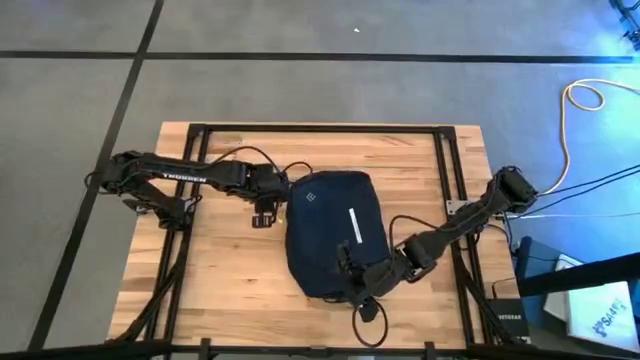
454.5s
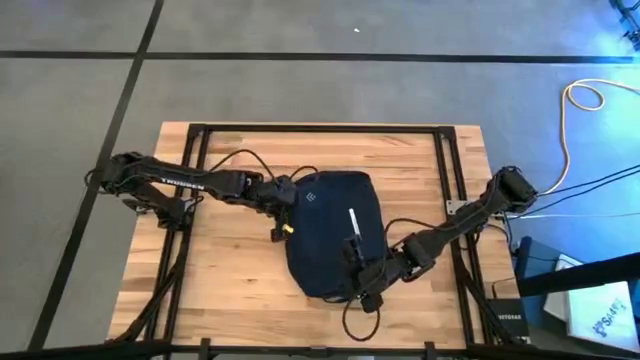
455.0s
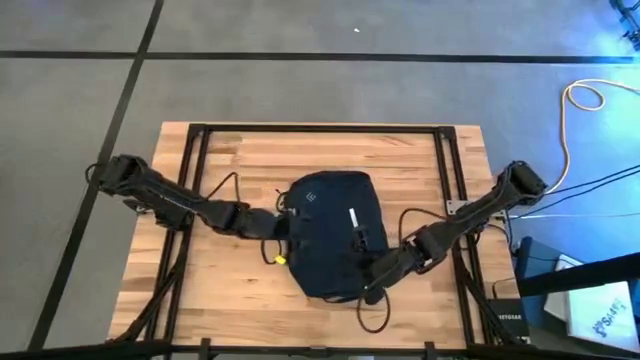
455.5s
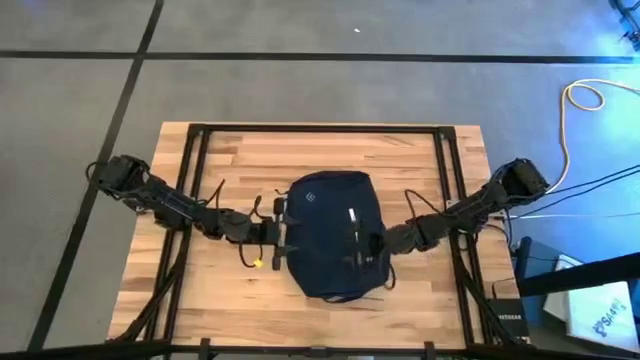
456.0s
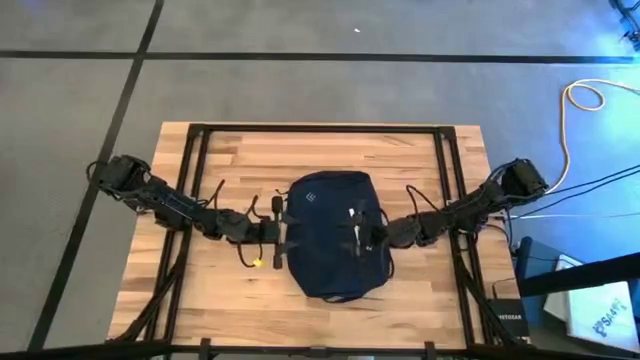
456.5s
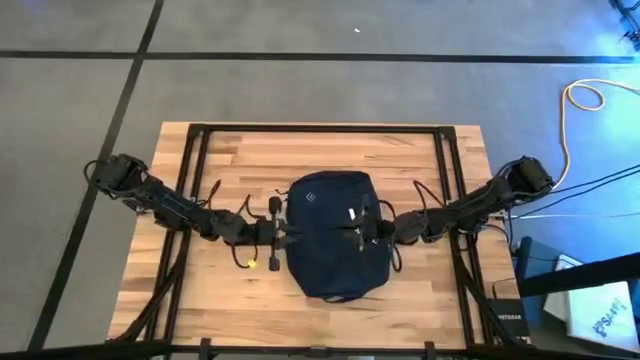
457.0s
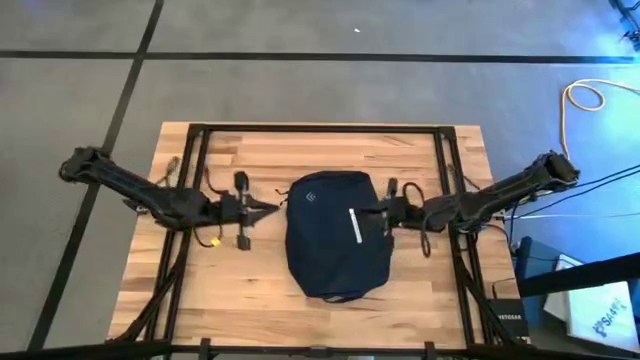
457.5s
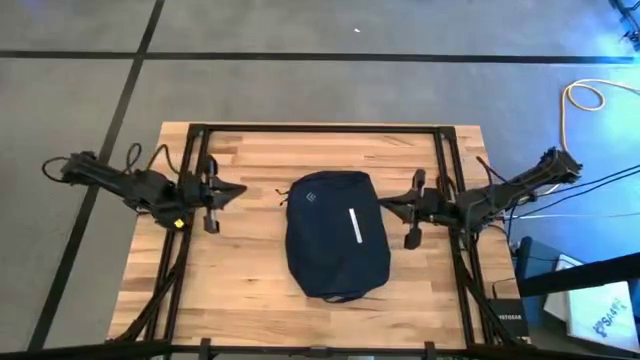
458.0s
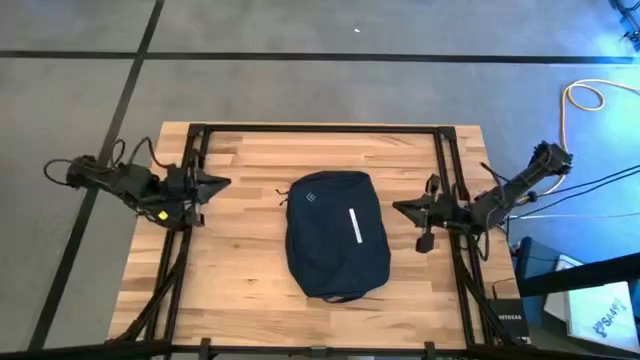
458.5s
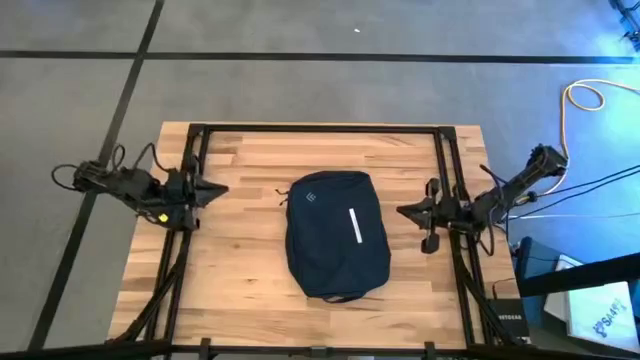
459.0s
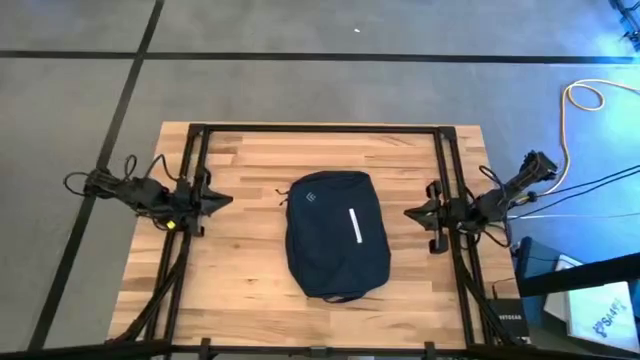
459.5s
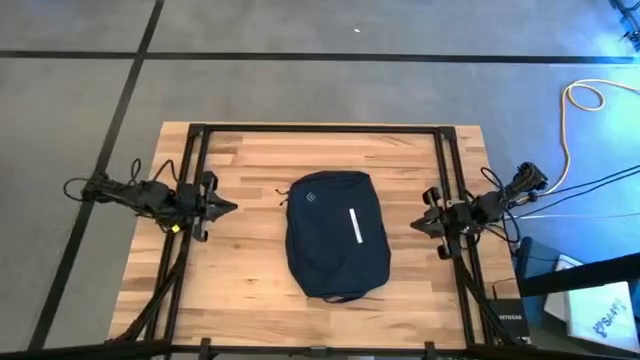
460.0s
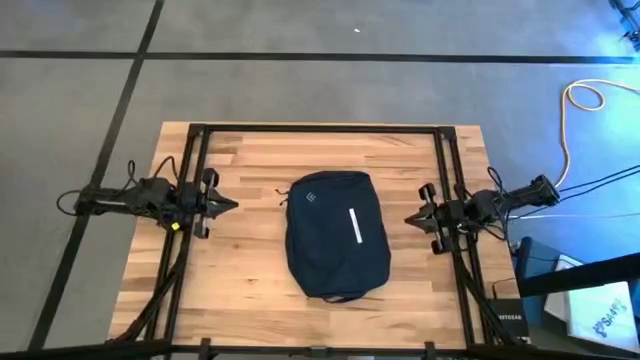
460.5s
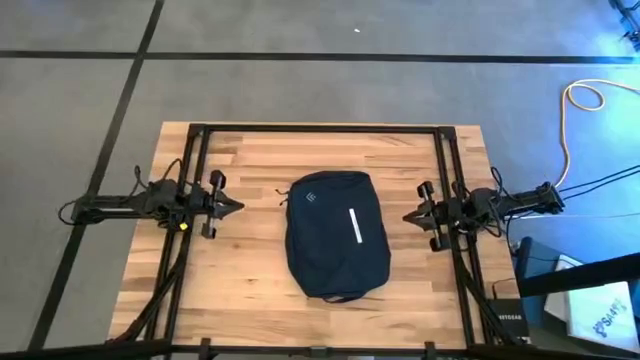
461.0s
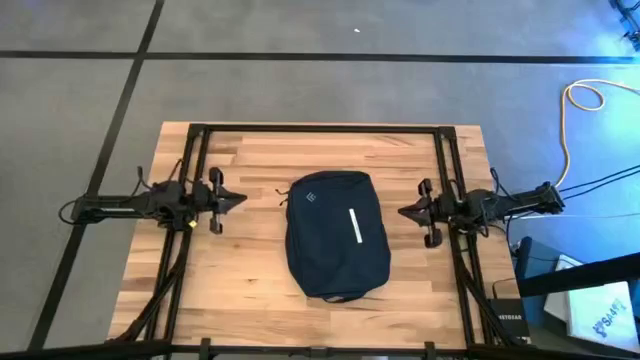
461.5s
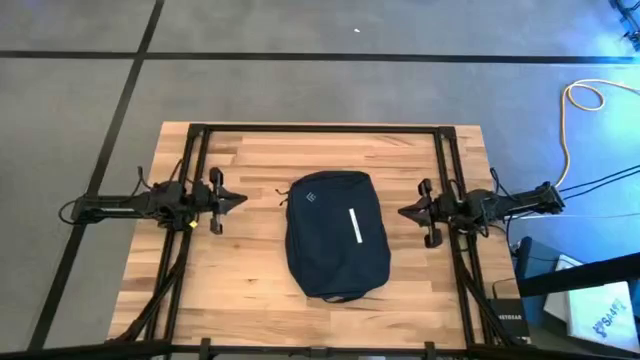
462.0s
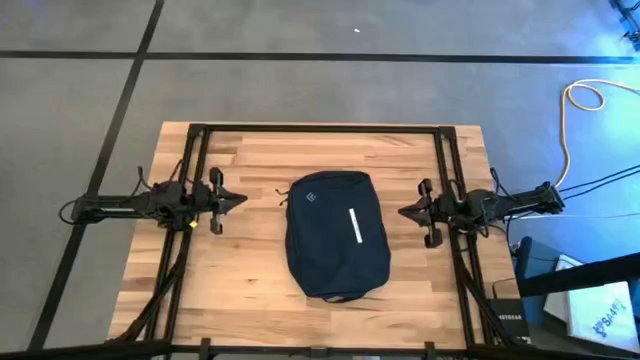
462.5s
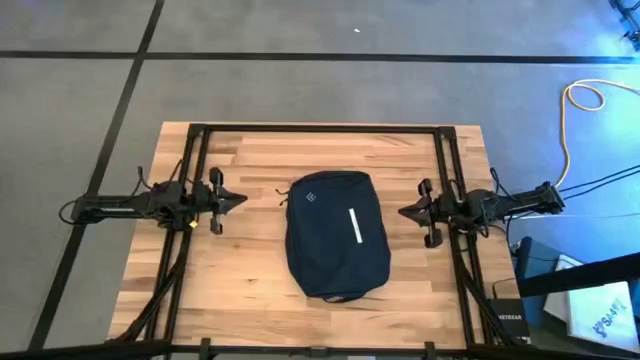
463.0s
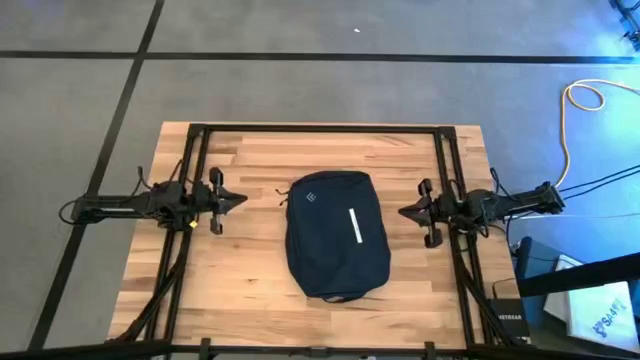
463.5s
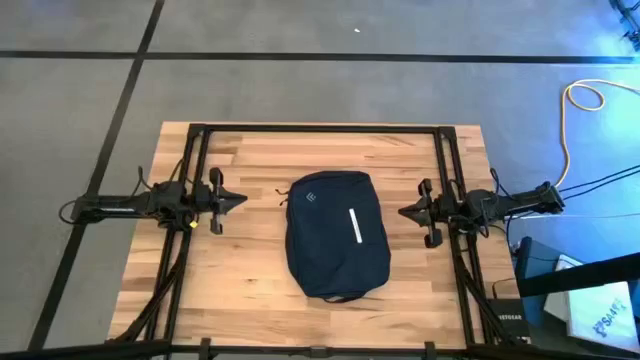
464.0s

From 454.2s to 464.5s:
Task: Unpack backpack
Return to Home Position

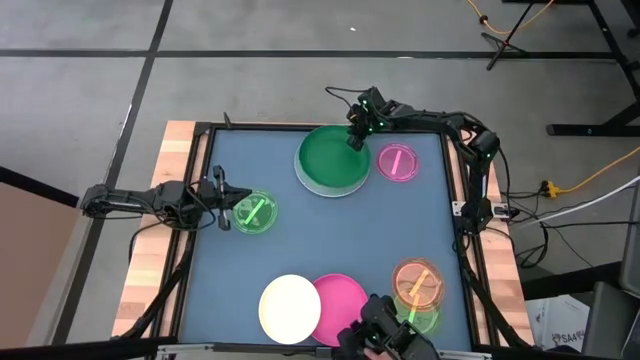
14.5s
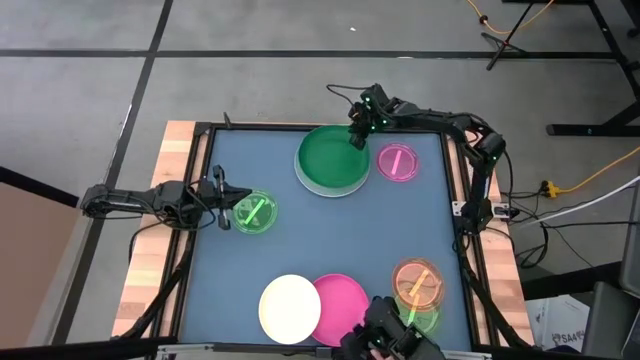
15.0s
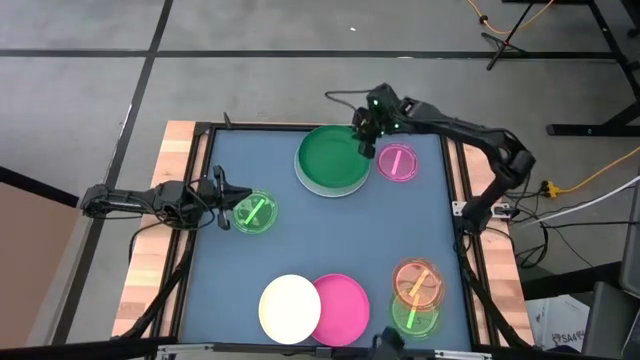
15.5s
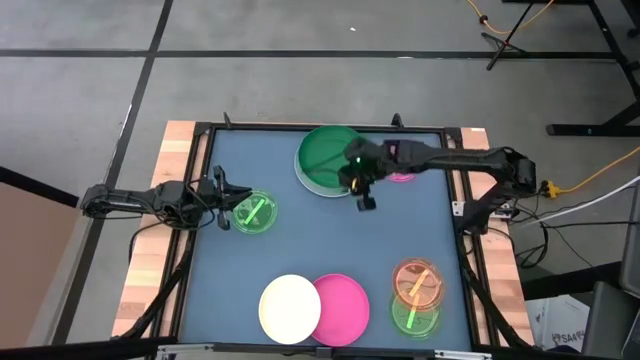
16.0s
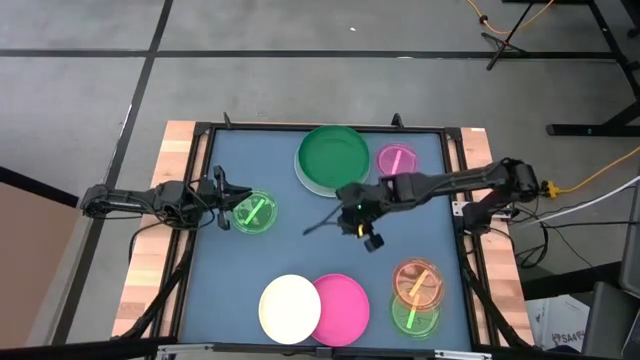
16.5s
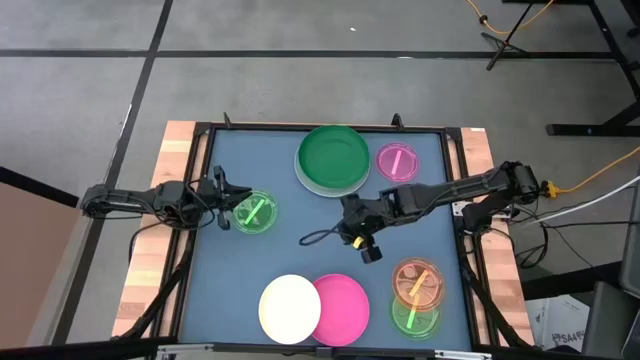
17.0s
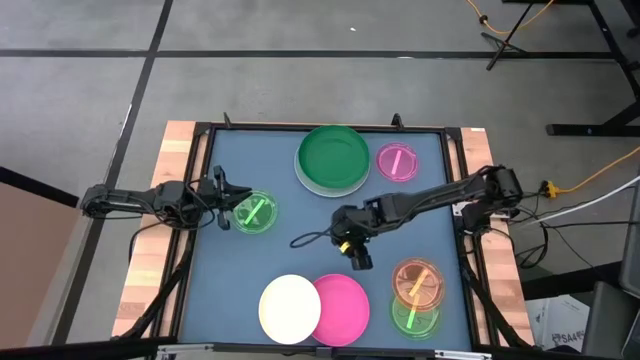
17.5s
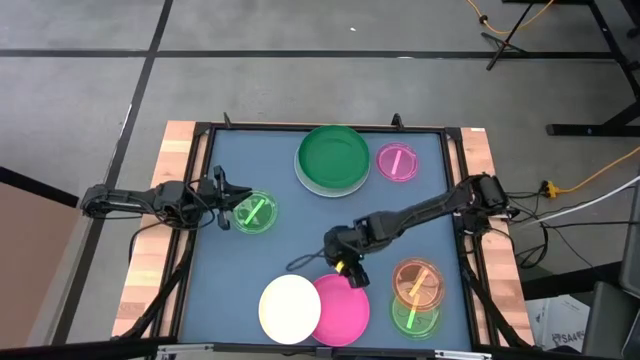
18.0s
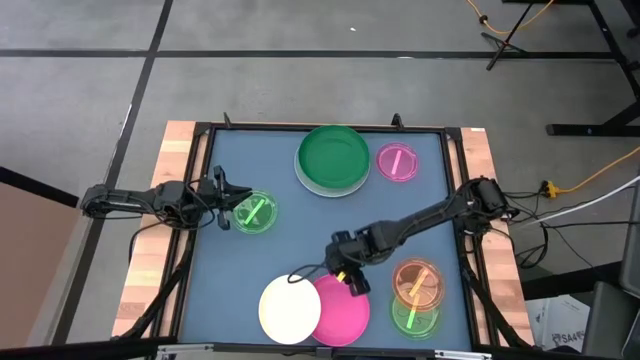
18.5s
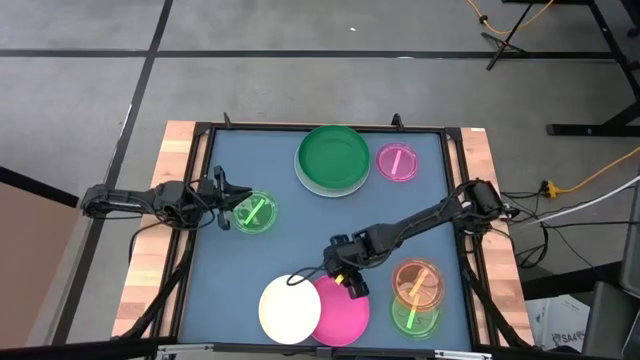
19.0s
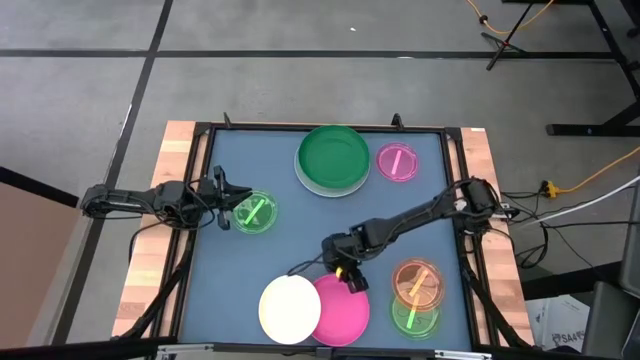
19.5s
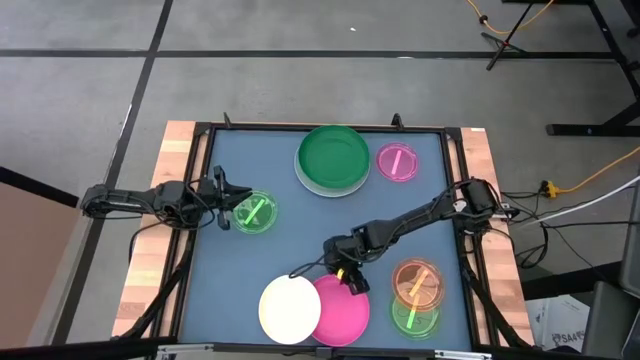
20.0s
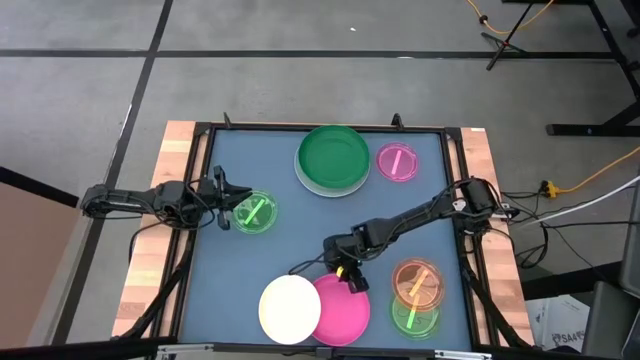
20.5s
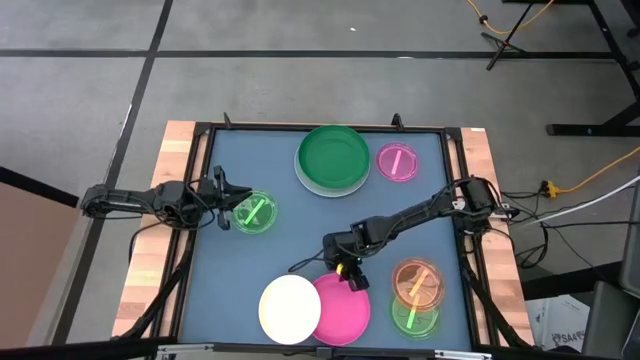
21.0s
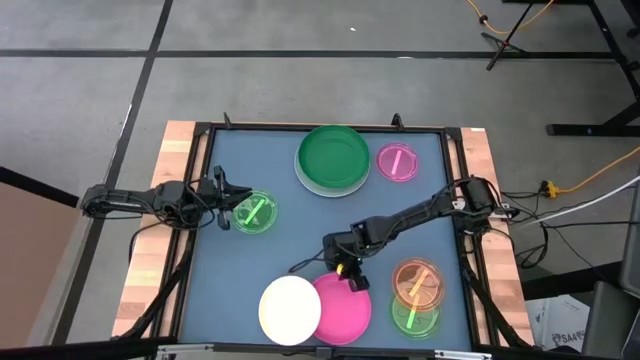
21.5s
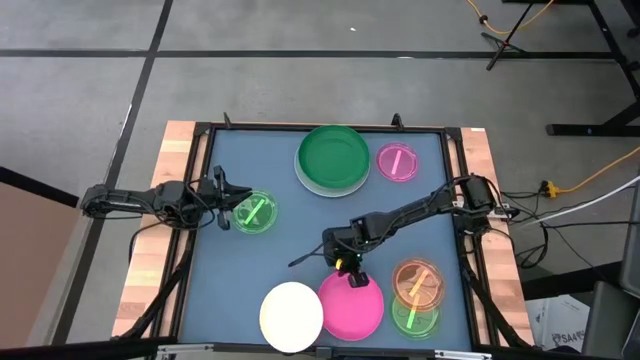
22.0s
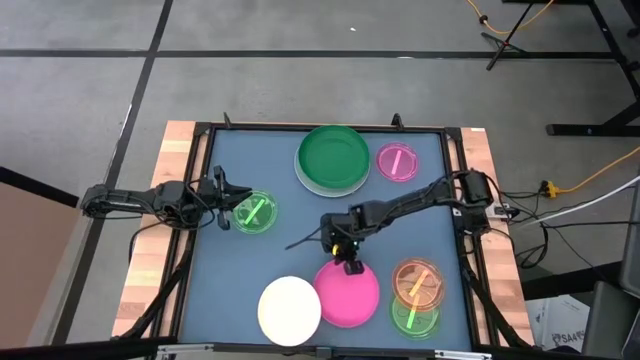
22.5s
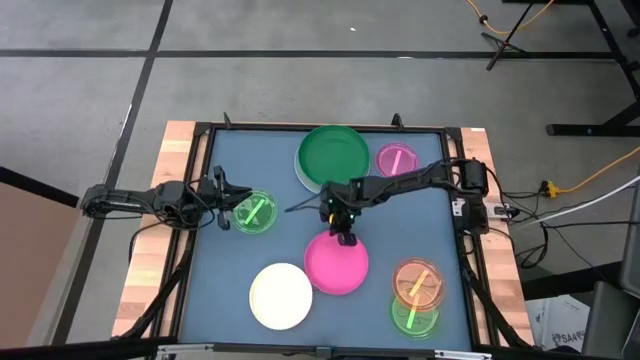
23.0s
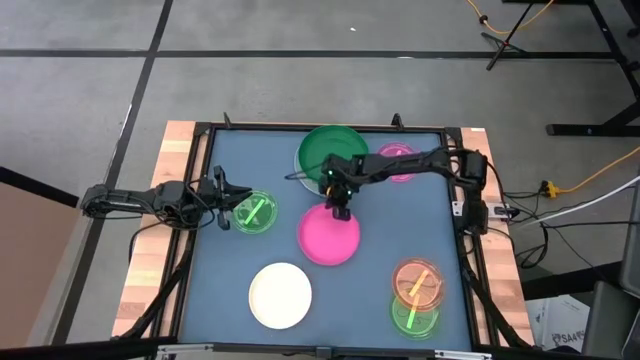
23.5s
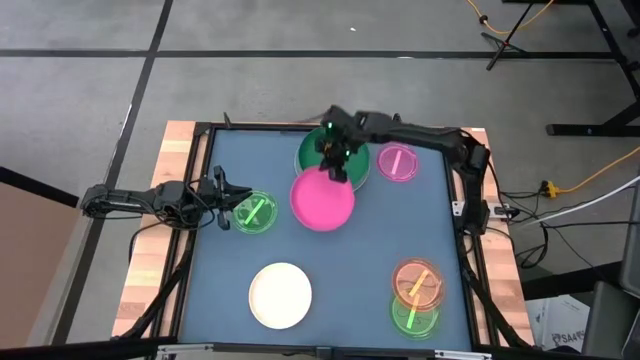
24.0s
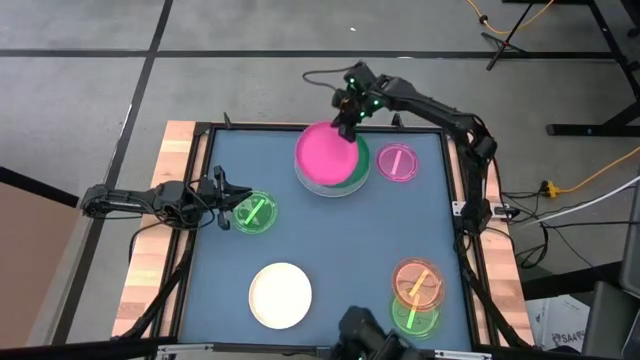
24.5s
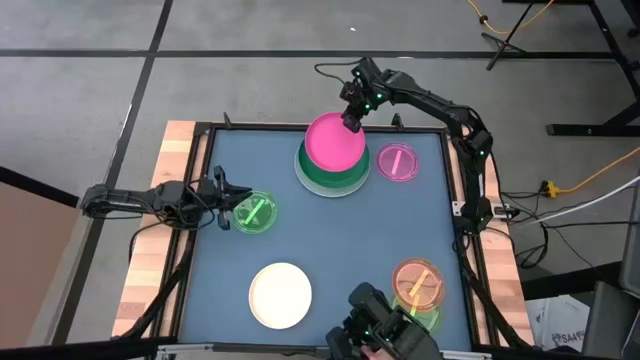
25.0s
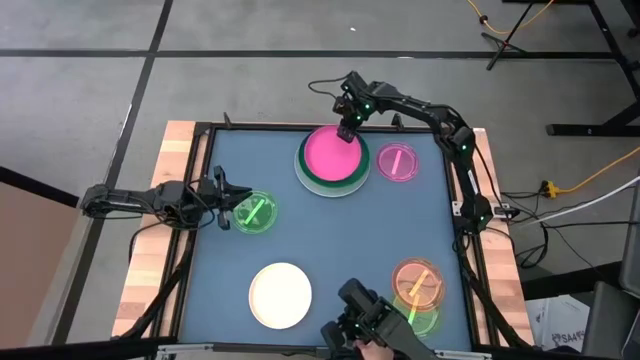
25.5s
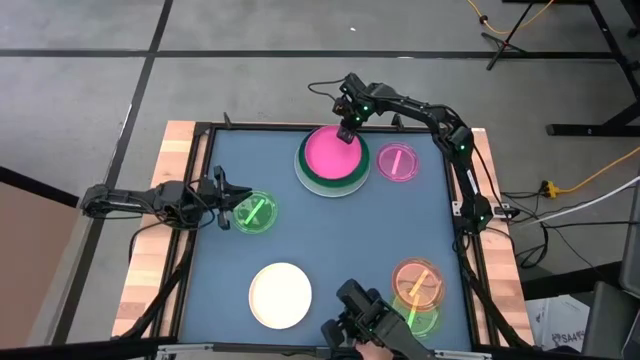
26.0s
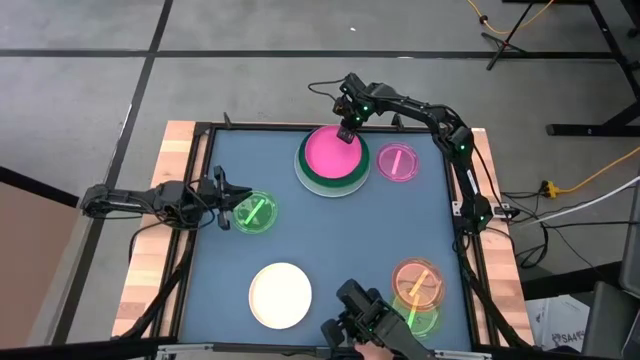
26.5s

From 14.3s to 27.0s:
Task: Stack plastic plates
Stack the pink plate on top of the green plate
